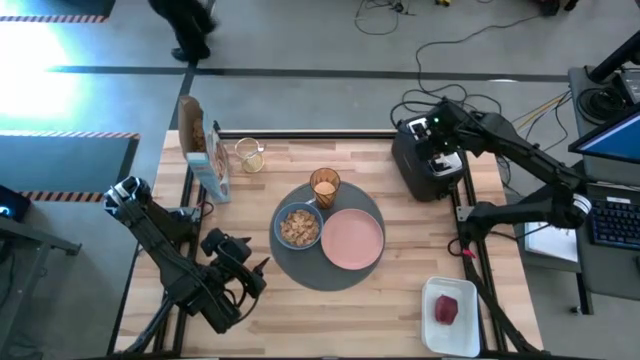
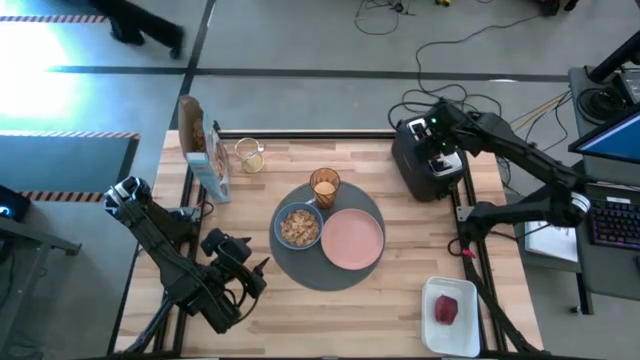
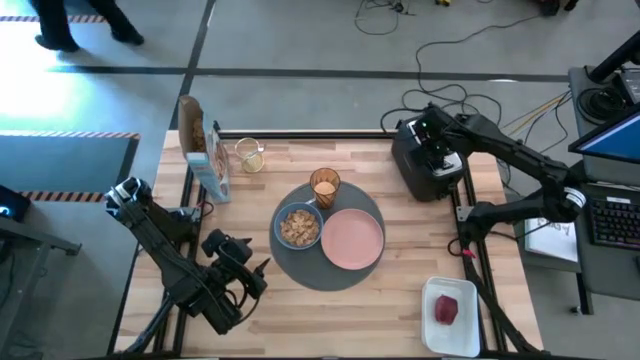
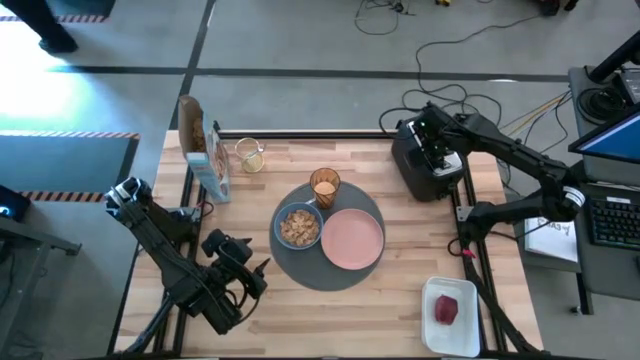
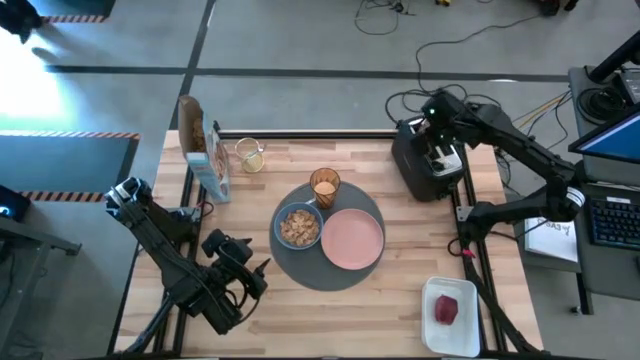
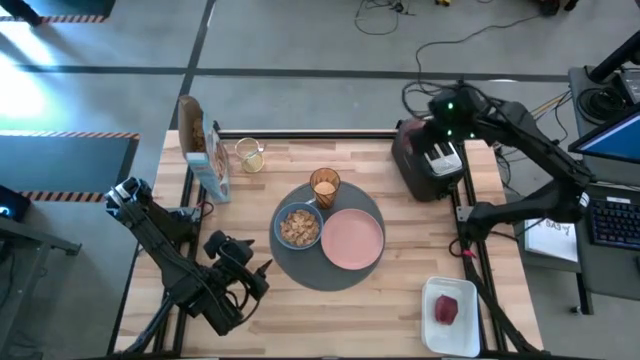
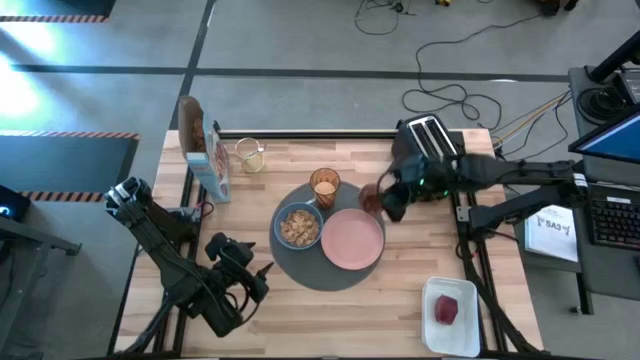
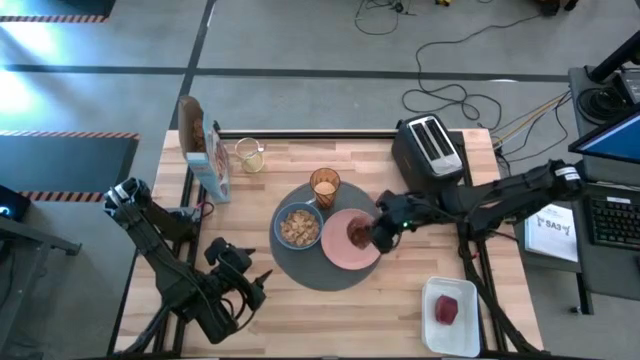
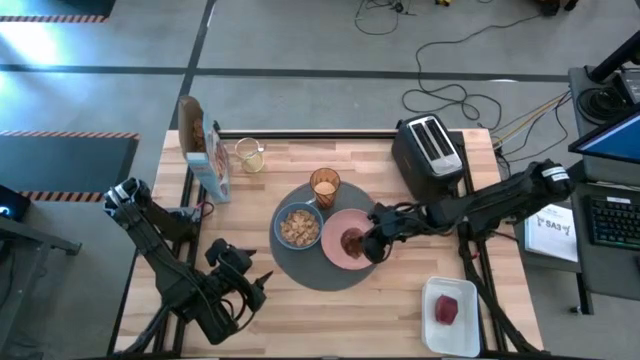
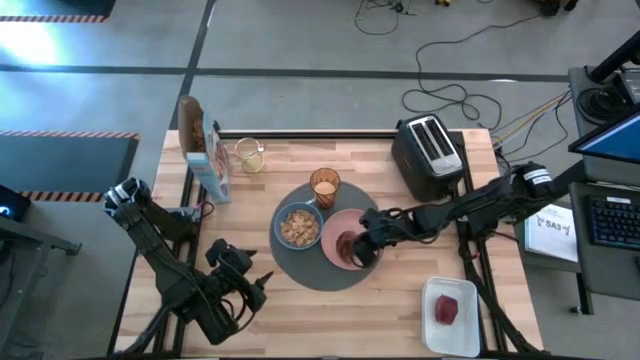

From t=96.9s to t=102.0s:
Task: Arrange a breakfast setting
Put the bread on the pink plate

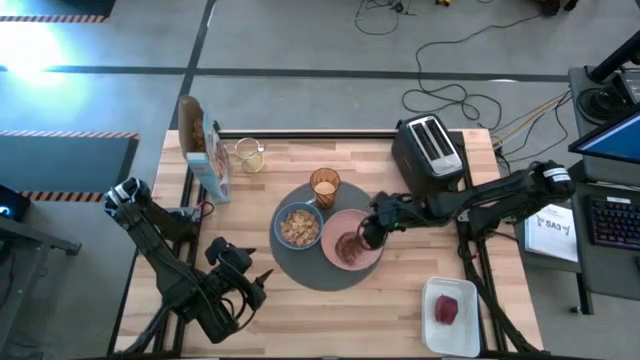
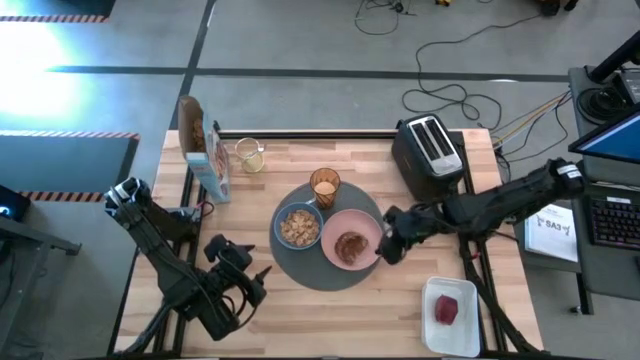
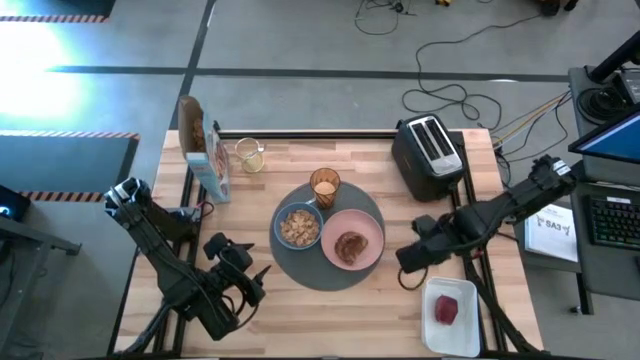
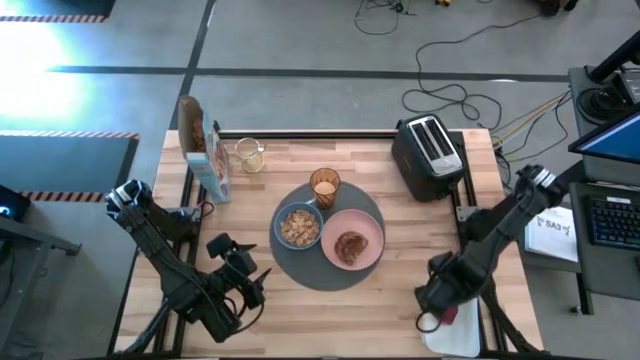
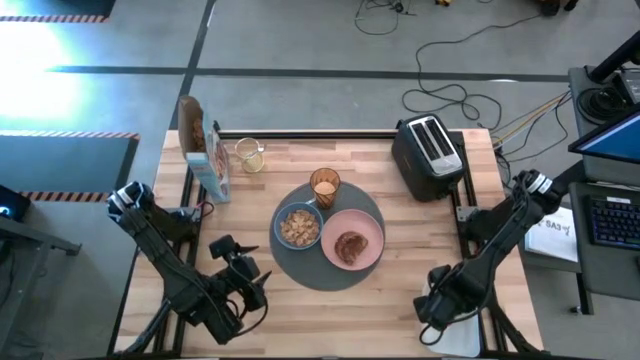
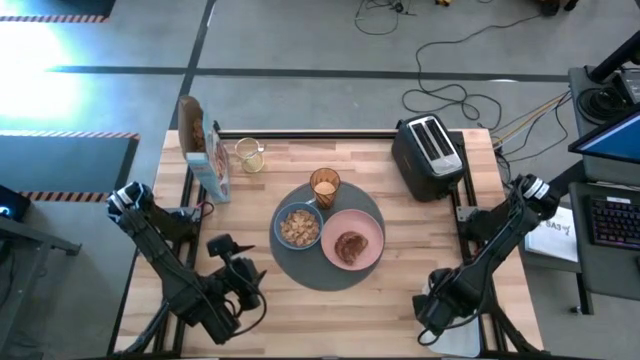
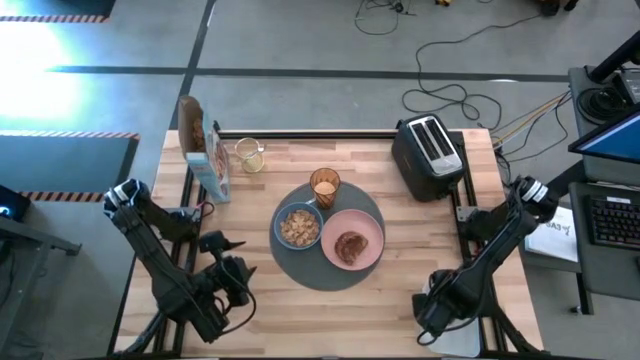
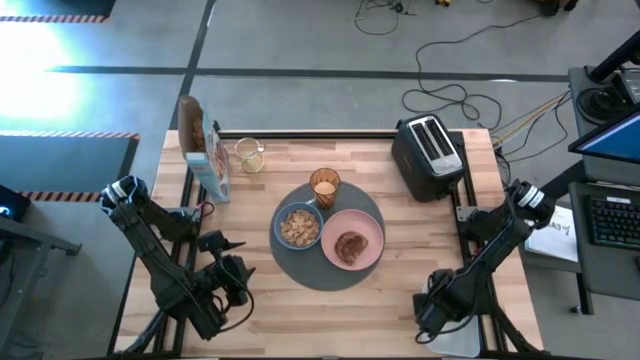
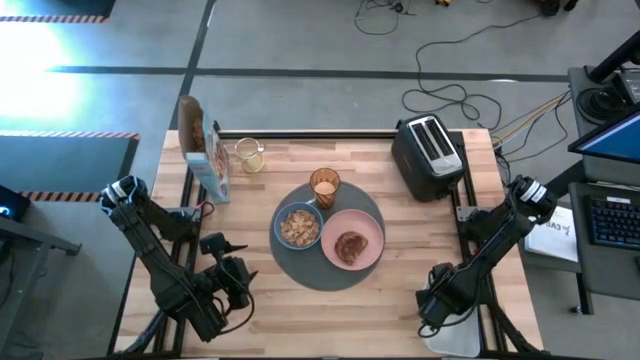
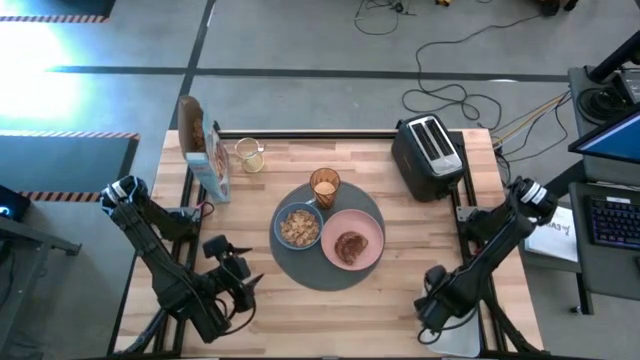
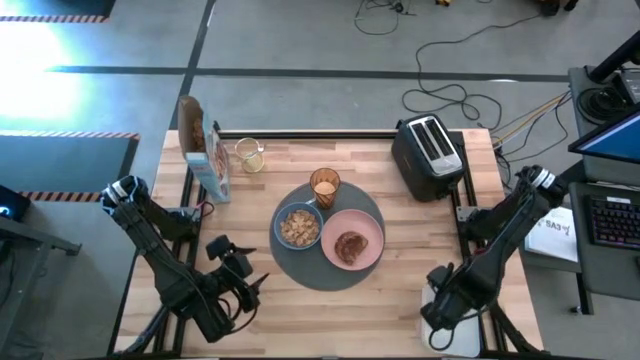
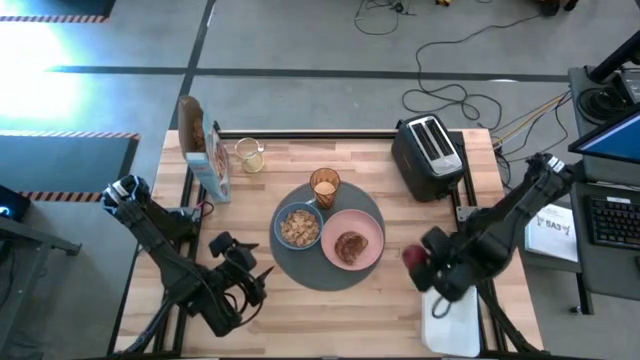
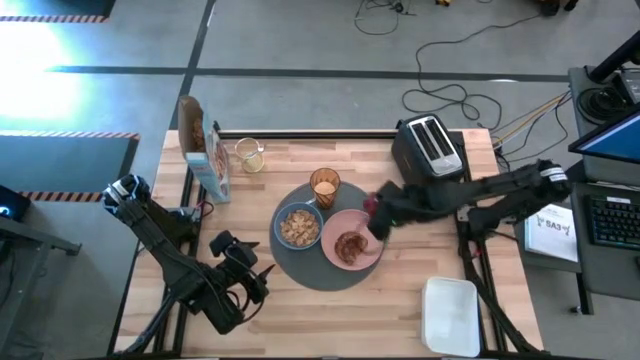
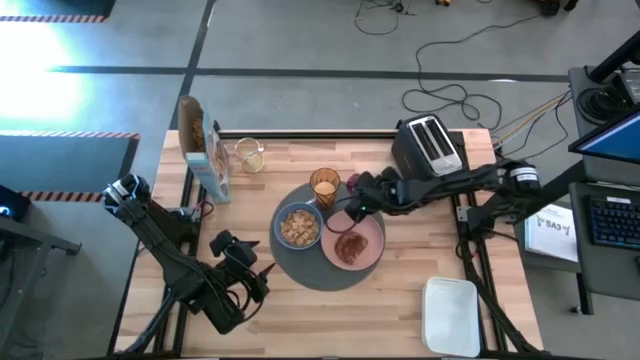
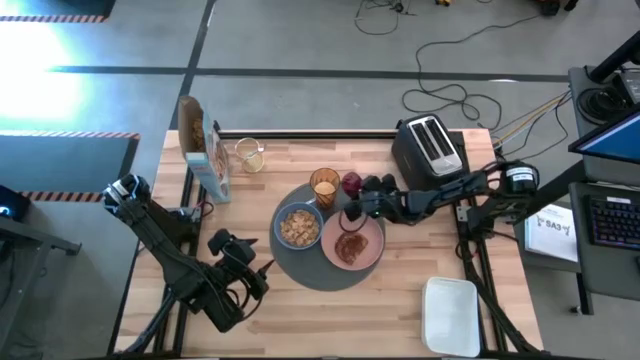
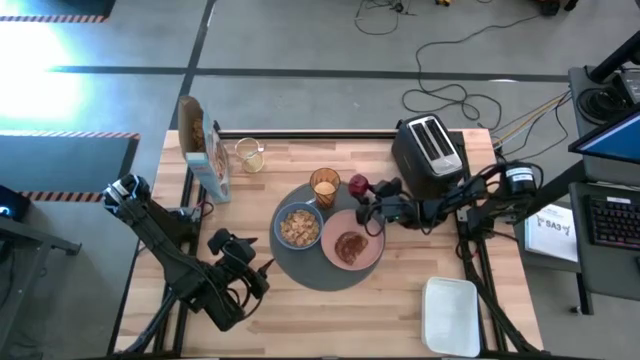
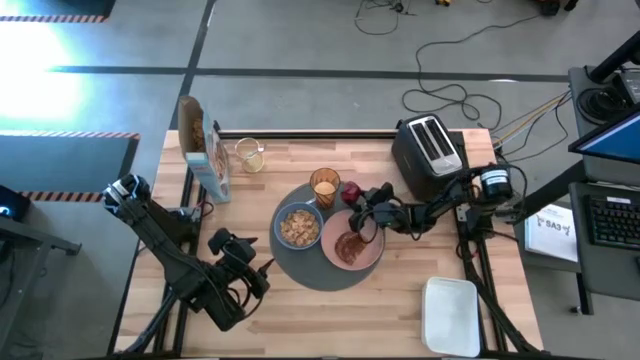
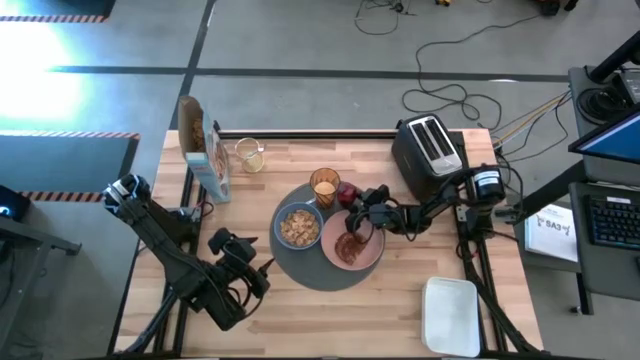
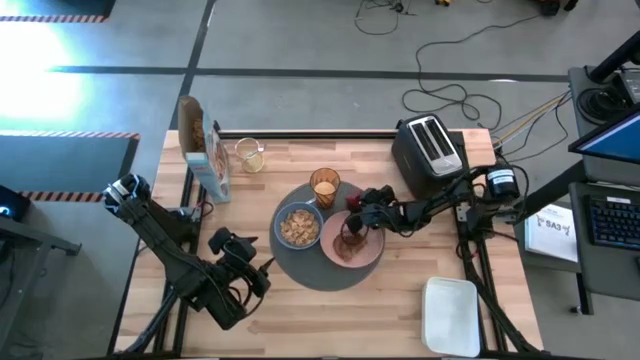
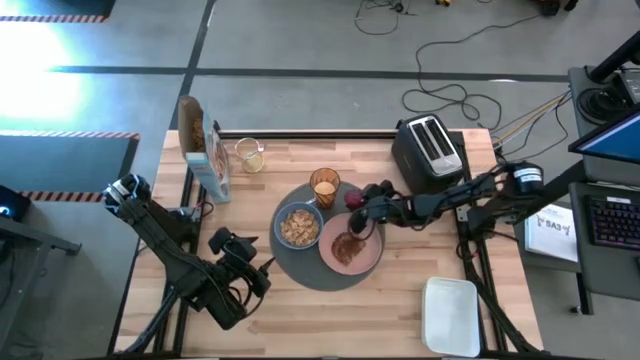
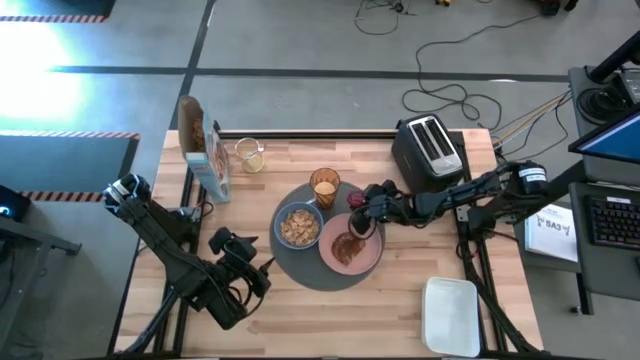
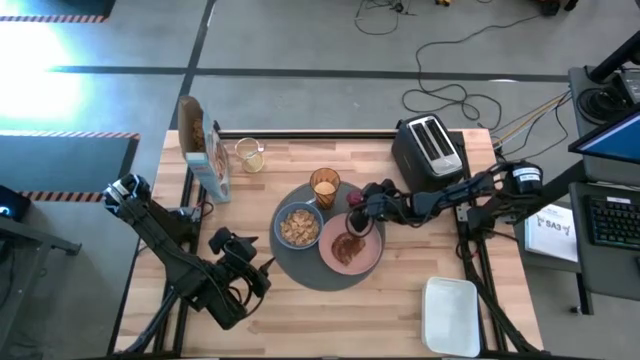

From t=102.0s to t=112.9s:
Put the apple on the placemat

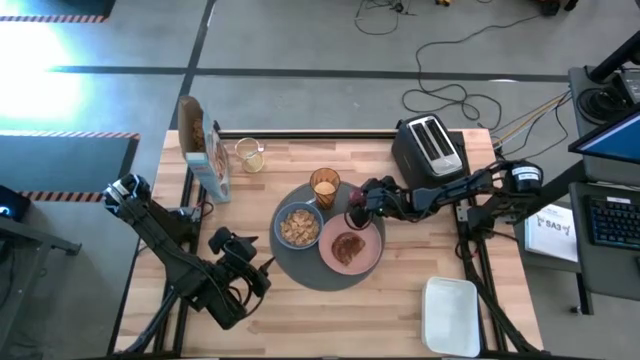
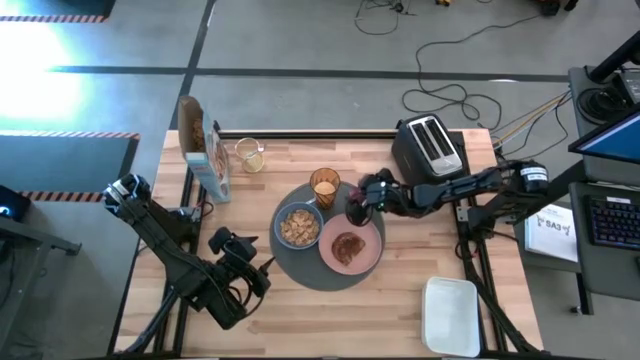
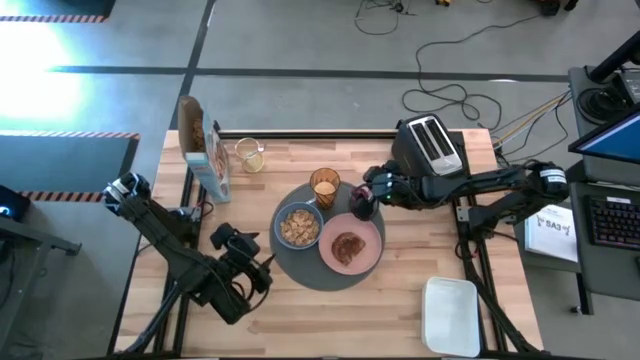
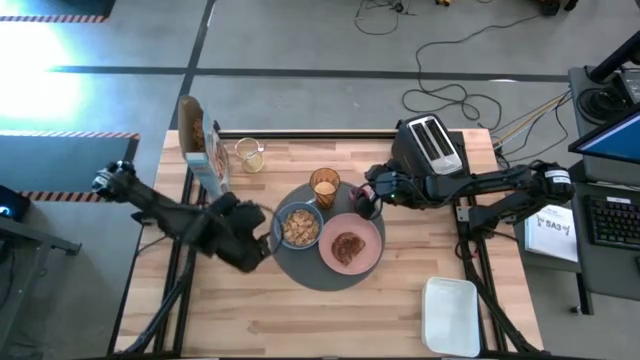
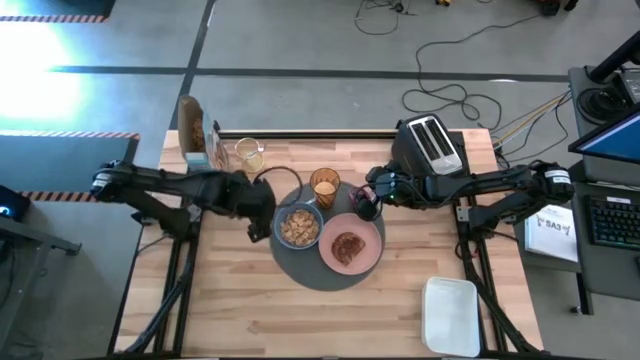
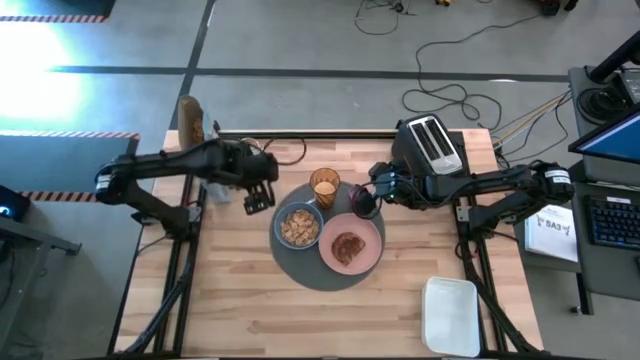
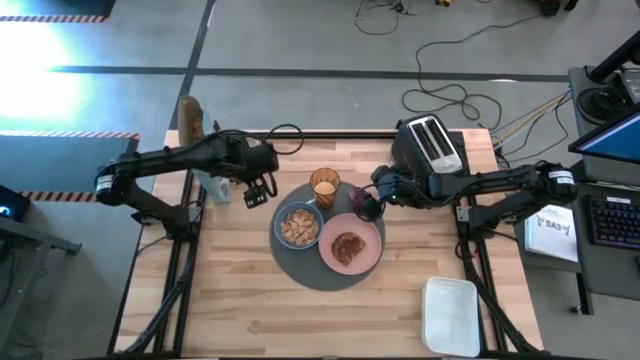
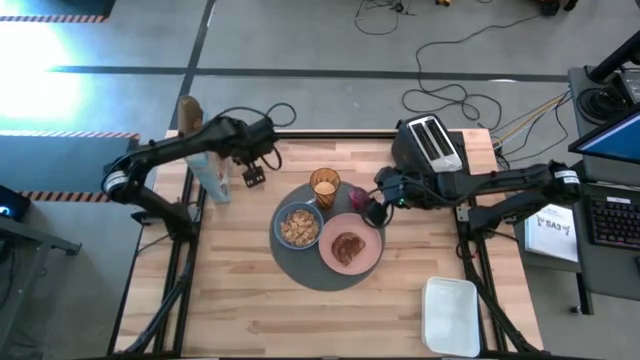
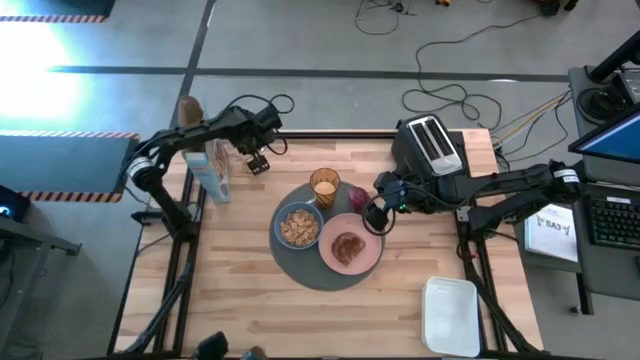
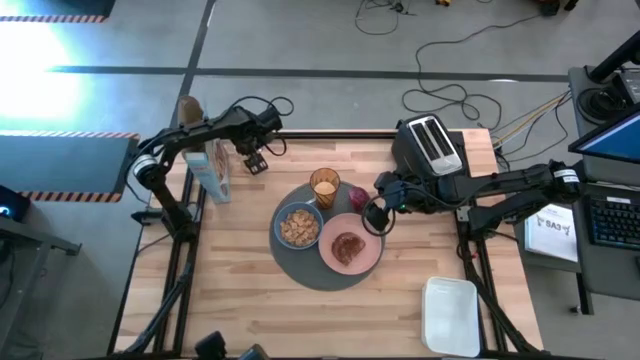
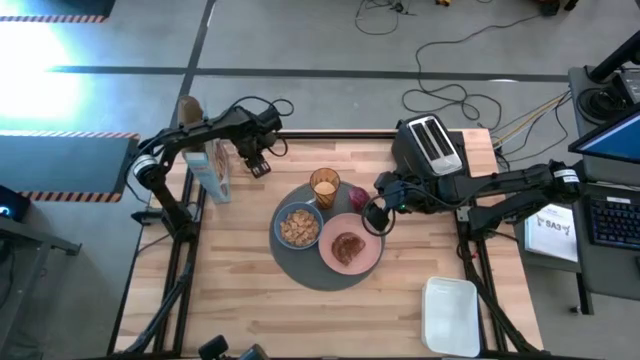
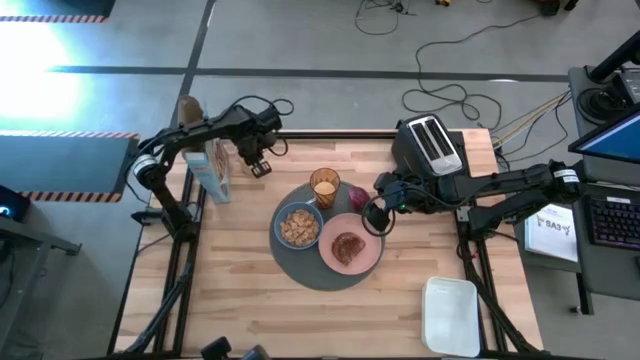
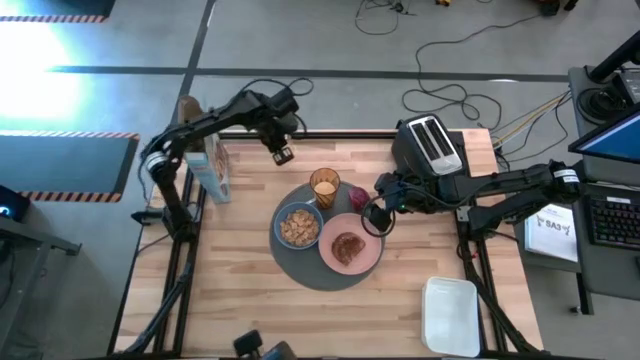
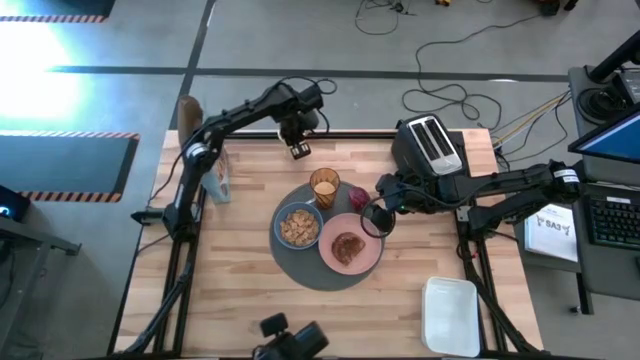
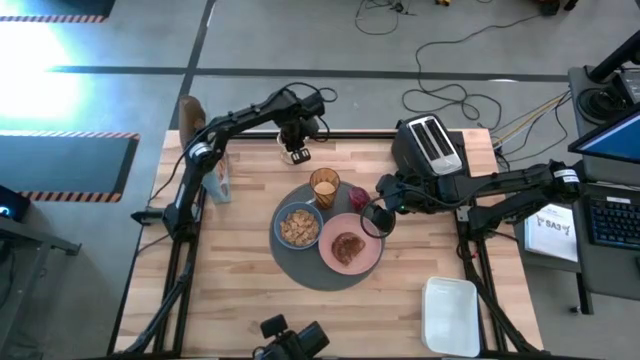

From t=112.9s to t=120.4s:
Move the spoon holder to the center top of the table
